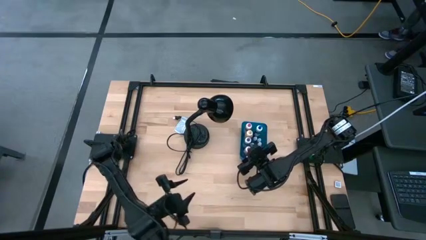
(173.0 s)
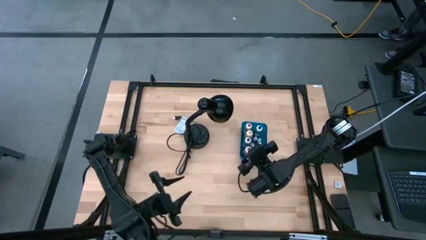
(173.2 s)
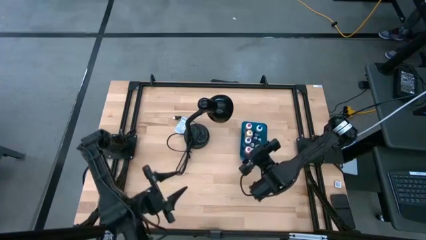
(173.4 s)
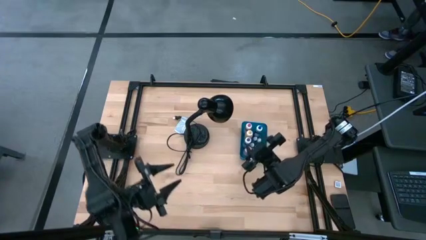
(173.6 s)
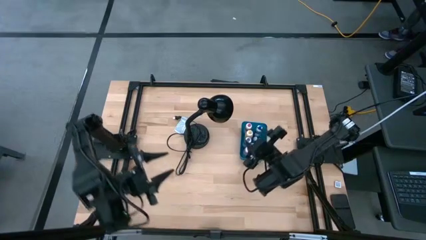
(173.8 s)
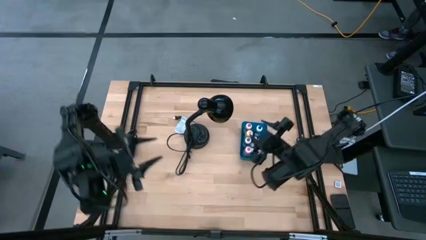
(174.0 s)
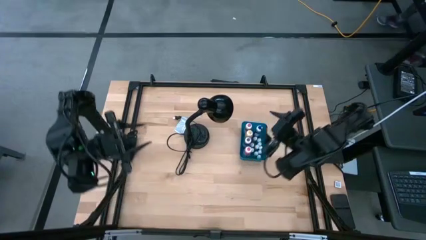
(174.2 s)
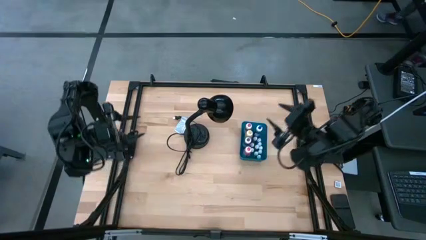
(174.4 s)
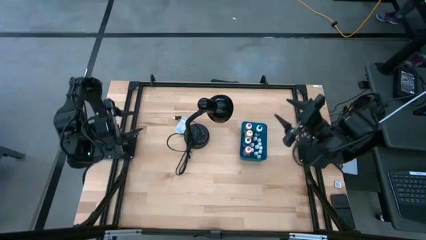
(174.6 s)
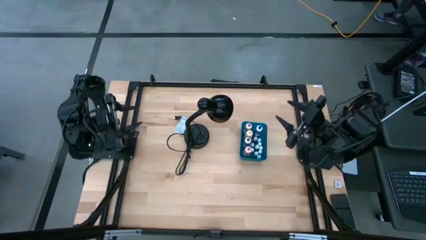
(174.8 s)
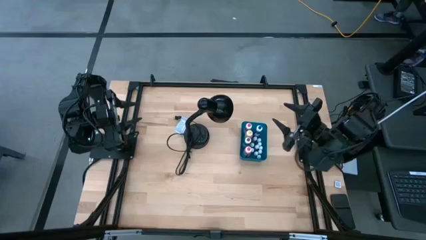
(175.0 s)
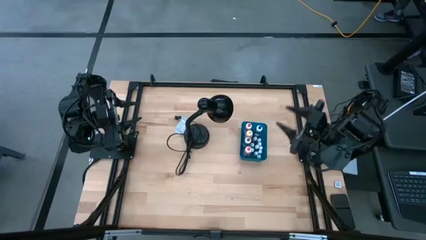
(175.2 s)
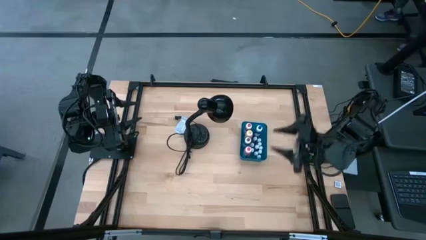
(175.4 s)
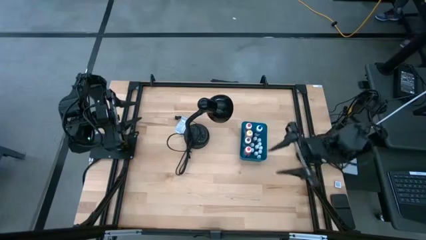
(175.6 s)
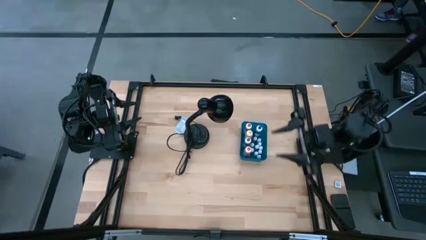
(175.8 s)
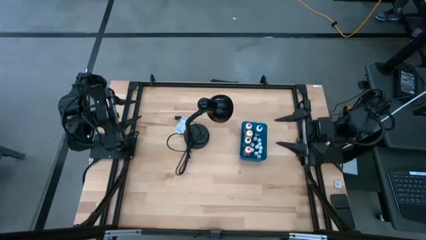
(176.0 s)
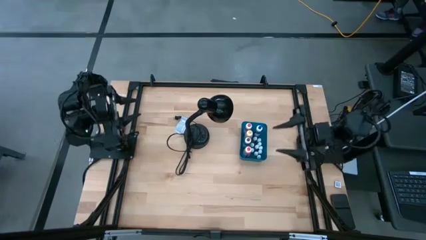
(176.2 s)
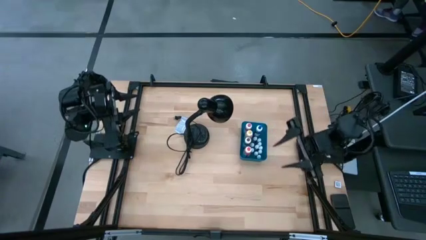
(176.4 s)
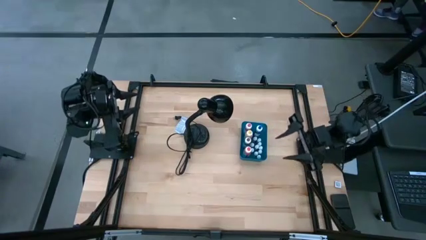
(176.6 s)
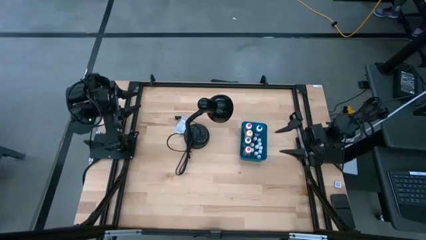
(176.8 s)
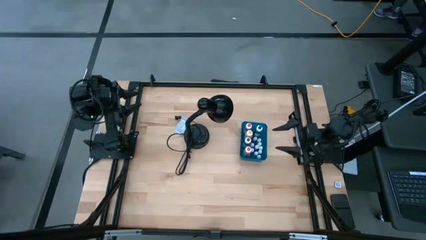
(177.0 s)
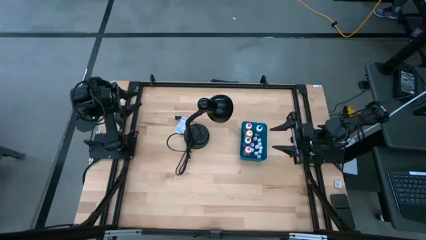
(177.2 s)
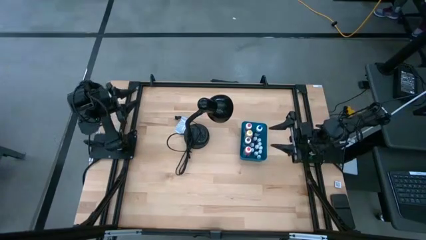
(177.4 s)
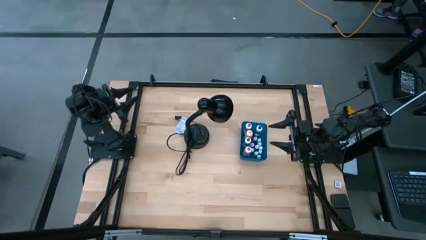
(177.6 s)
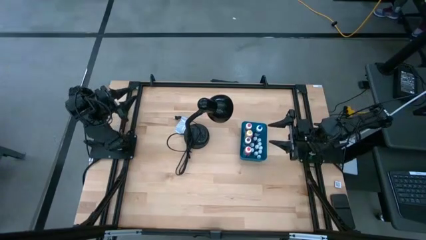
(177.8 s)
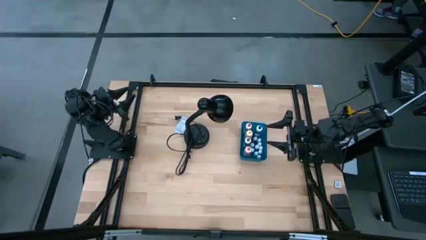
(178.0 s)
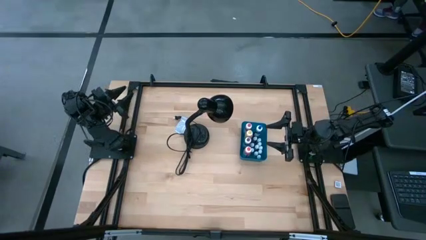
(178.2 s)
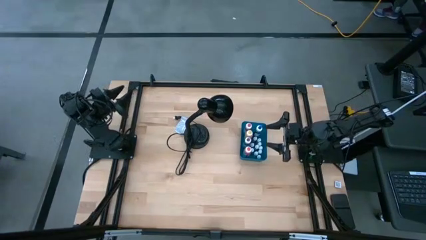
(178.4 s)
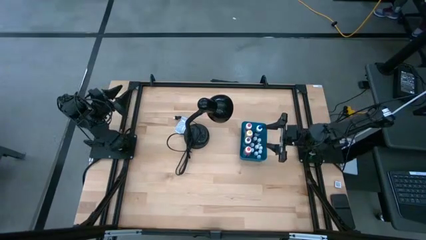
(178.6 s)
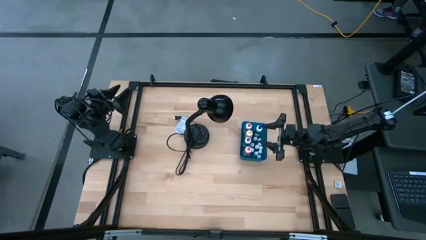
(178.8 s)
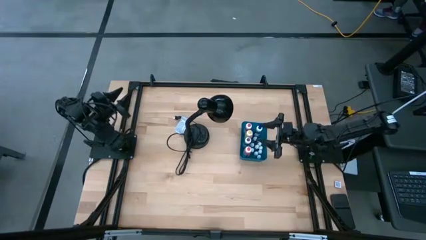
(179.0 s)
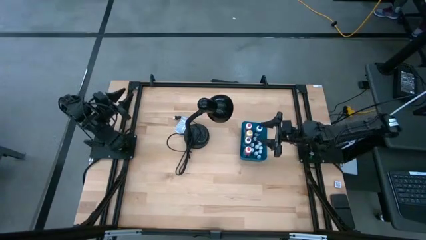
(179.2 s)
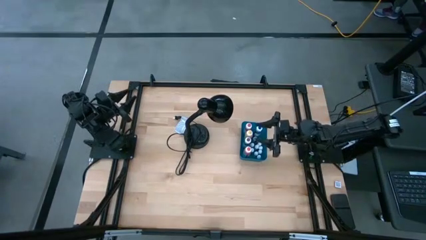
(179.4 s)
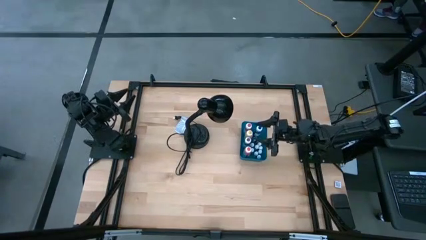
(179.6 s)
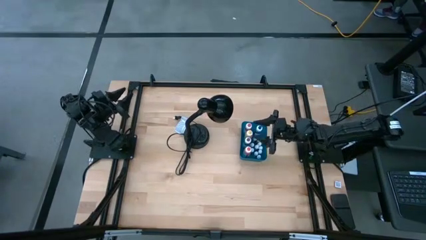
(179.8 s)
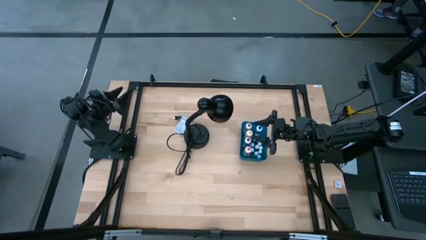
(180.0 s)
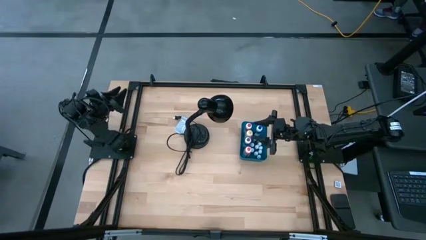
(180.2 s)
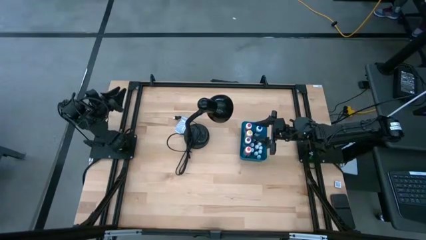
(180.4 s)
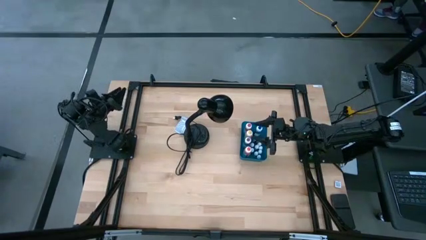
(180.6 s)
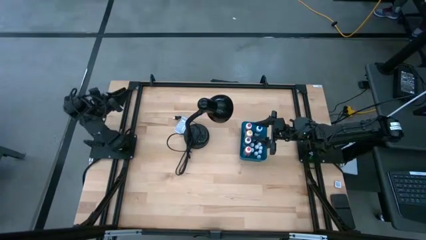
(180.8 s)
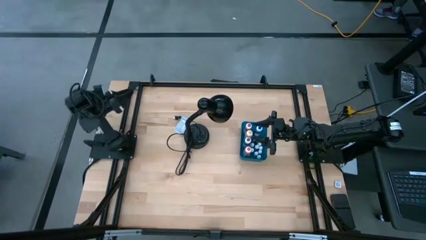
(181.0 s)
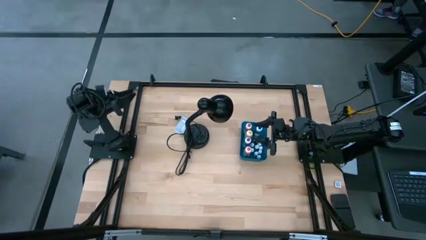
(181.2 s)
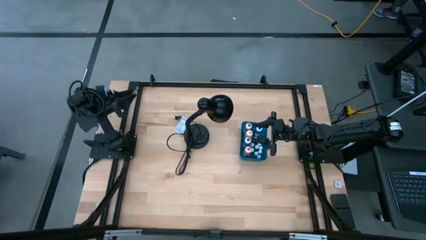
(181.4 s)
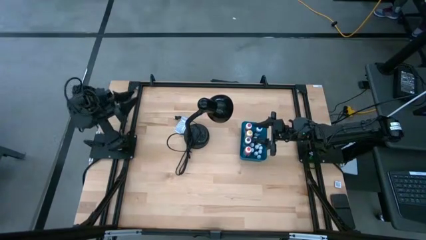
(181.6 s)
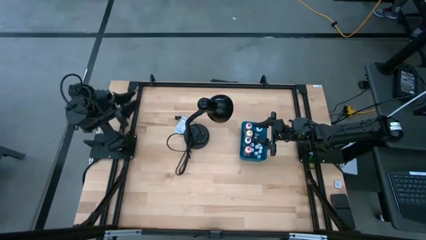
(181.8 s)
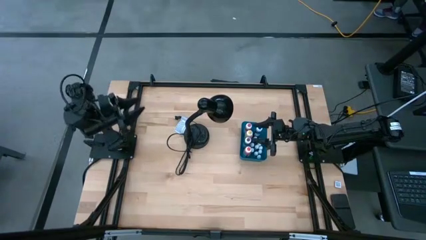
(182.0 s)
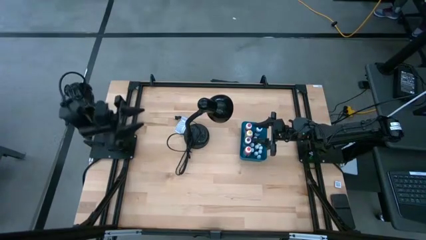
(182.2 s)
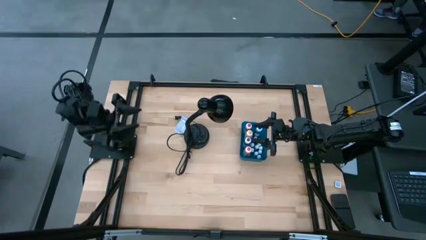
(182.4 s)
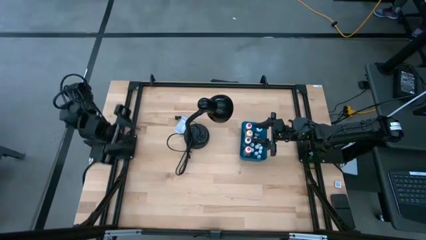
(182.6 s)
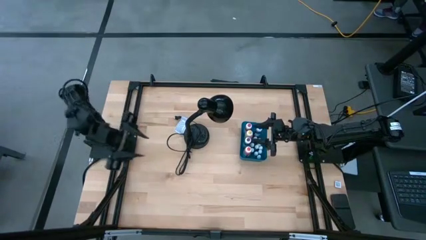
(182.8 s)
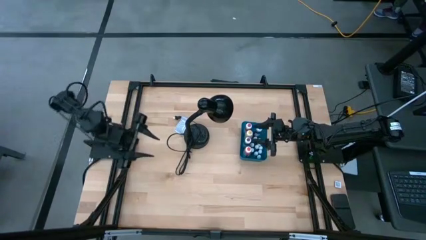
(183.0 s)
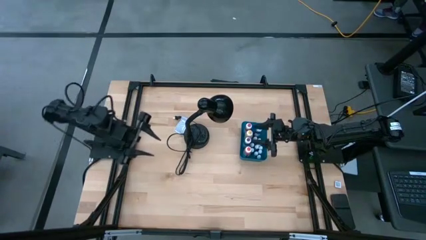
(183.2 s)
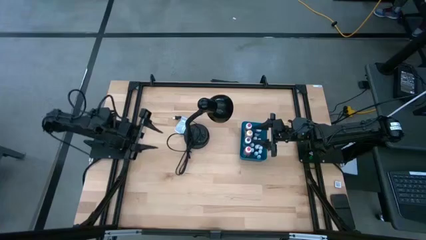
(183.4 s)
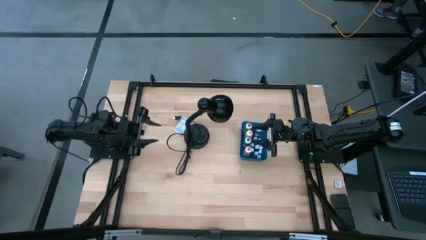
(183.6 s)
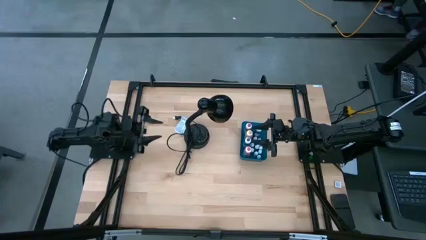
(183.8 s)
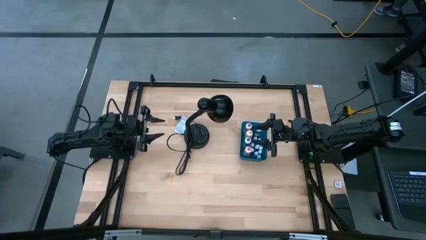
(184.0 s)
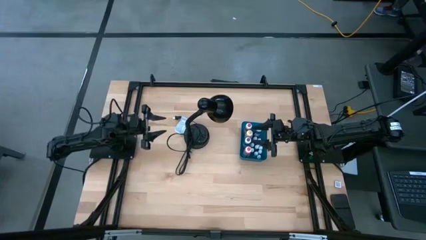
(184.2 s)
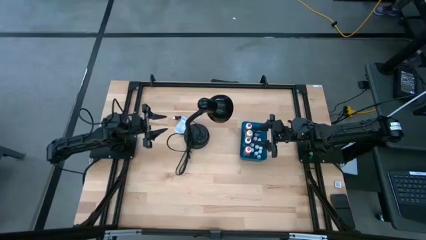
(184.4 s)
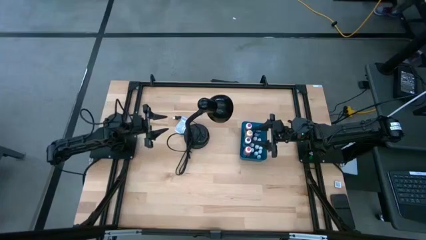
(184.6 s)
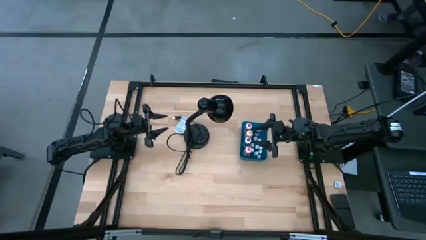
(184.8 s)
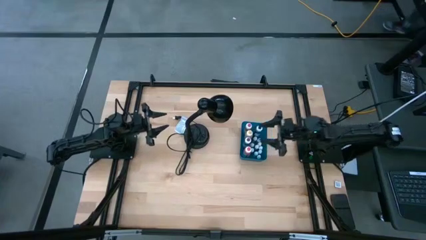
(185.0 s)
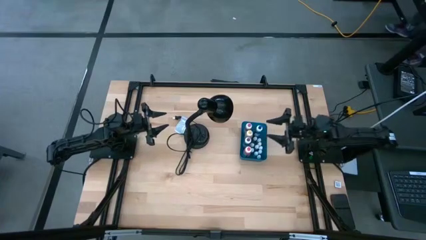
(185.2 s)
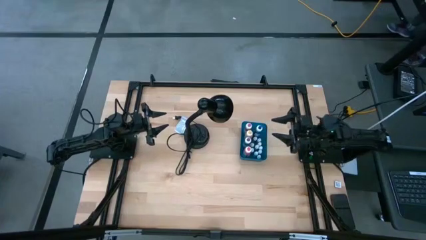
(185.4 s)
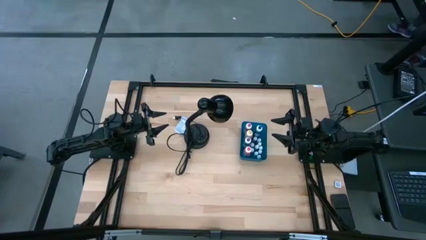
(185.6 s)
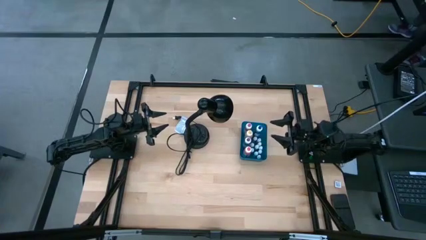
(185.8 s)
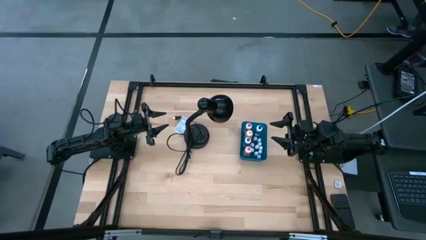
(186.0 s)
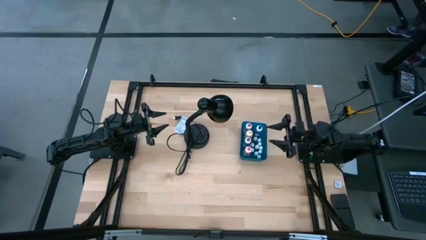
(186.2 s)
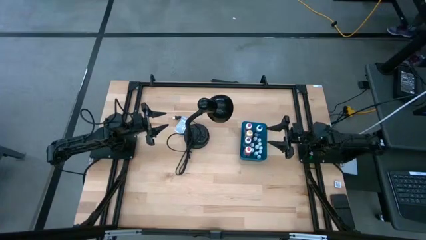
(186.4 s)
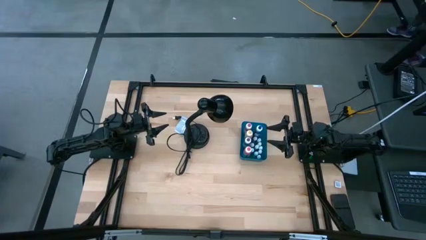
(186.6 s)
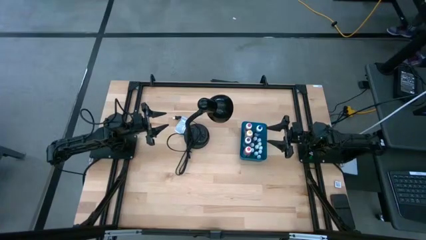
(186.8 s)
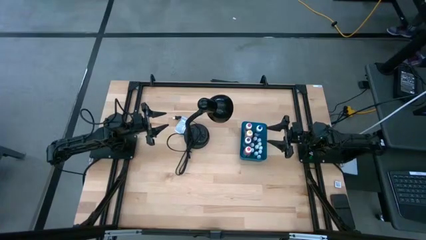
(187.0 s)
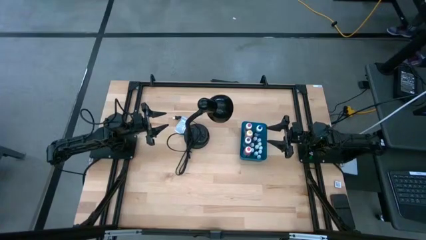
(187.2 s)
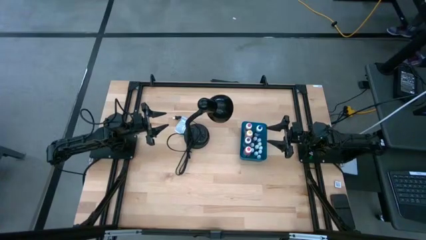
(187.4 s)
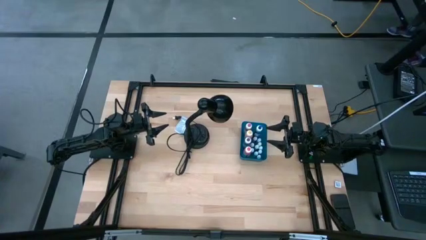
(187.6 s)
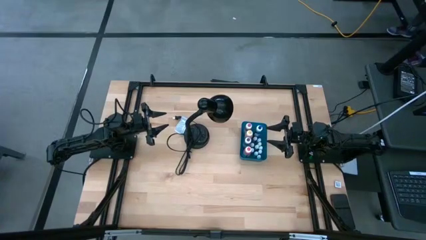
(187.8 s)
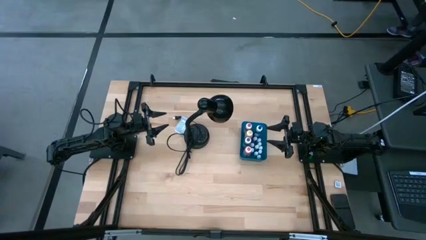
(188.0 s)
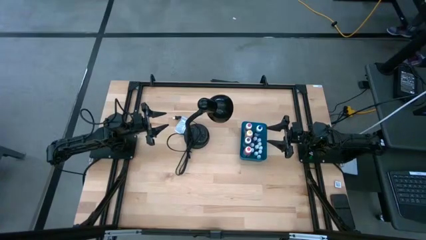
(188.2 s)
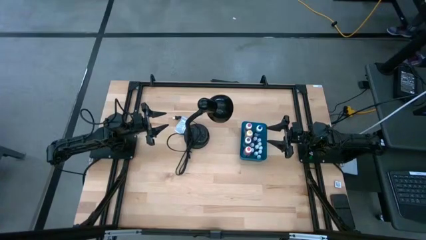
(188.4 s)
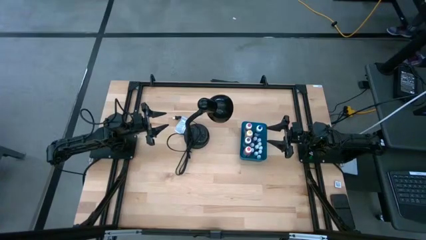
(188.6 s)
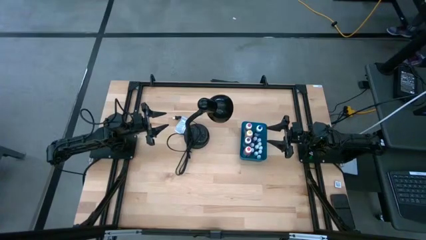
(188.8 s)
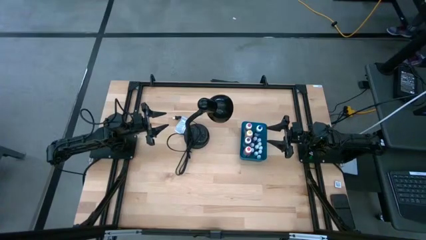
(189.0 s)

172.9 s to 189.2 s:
Task: Pick & Place food coloring
Return to Home Position
